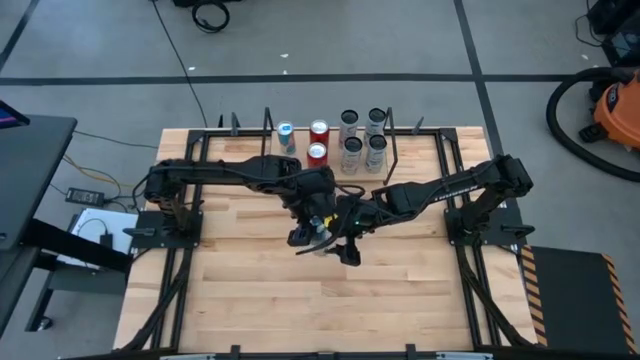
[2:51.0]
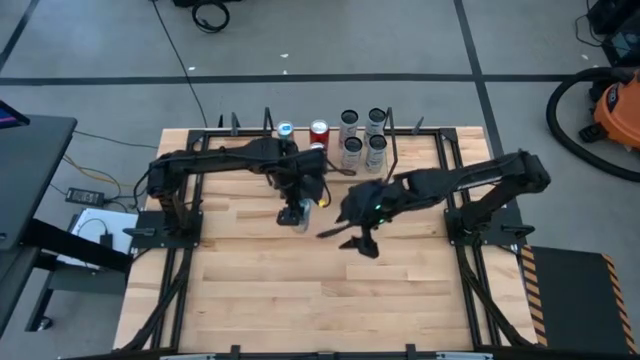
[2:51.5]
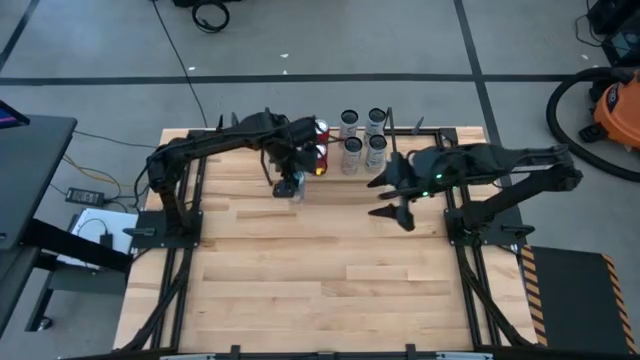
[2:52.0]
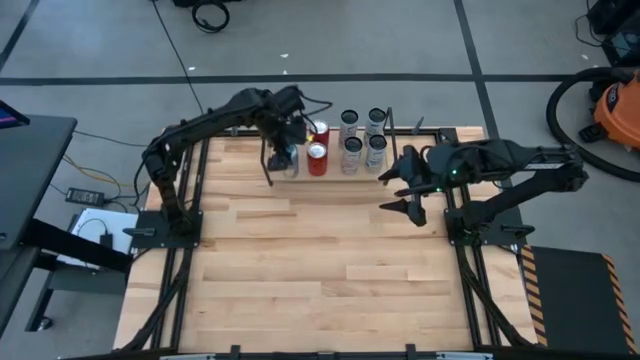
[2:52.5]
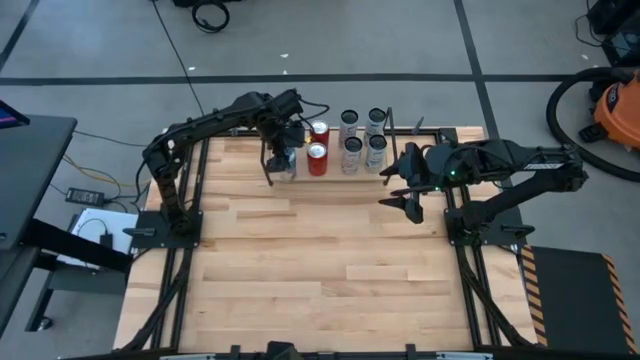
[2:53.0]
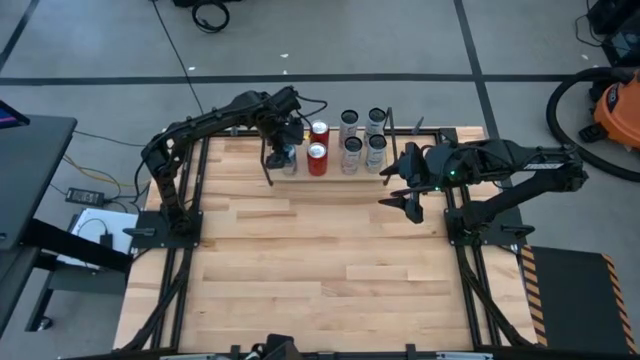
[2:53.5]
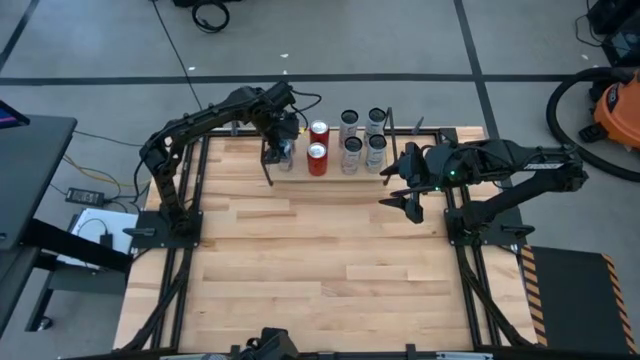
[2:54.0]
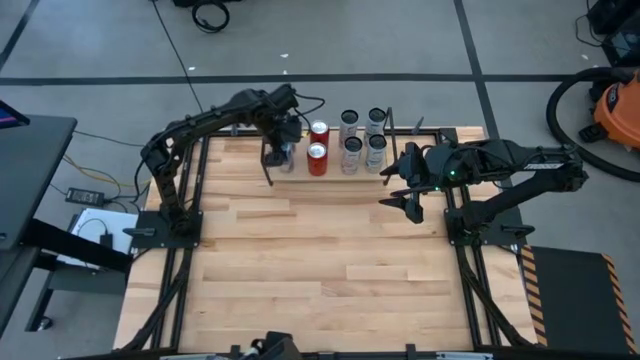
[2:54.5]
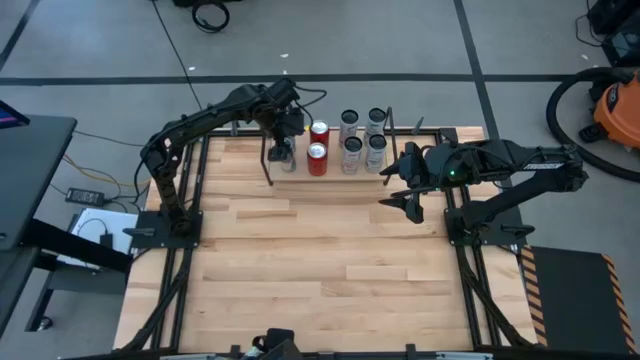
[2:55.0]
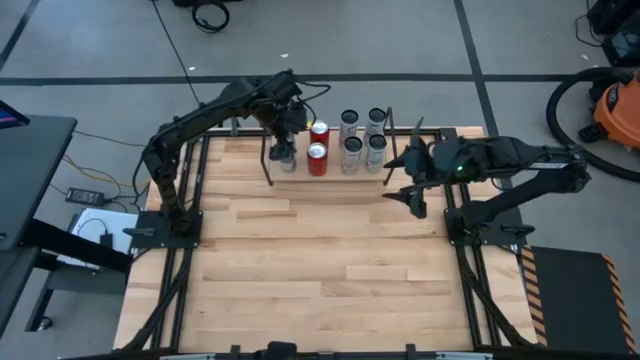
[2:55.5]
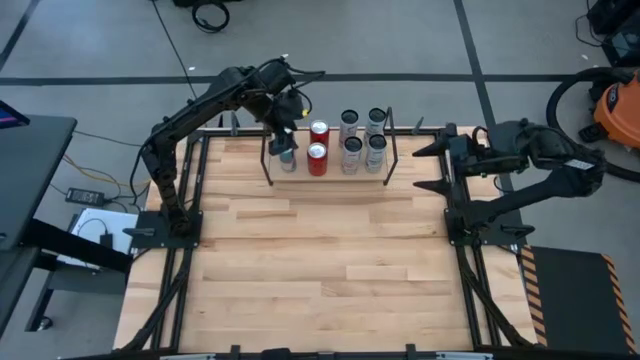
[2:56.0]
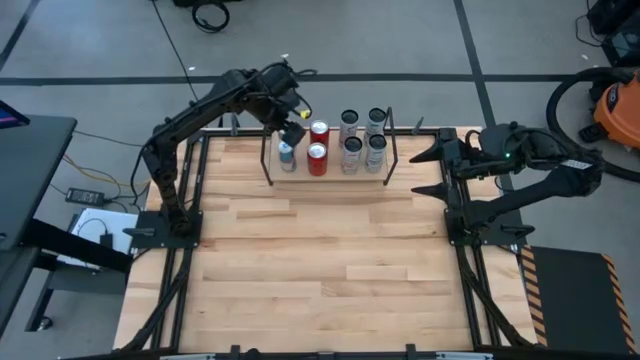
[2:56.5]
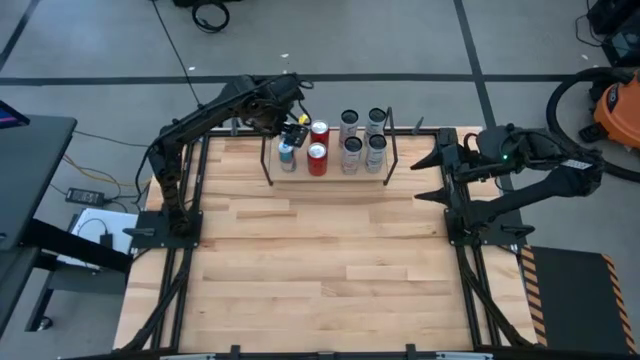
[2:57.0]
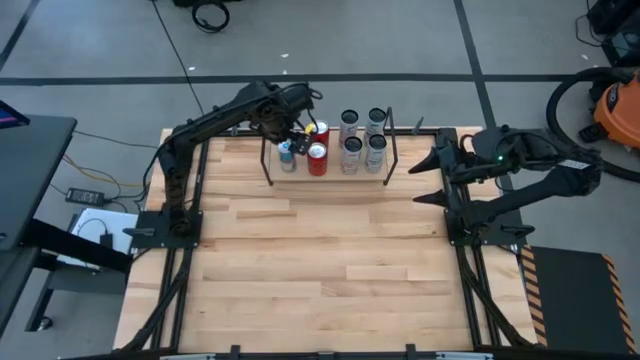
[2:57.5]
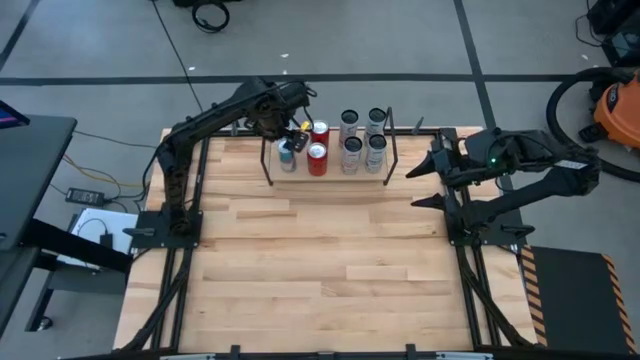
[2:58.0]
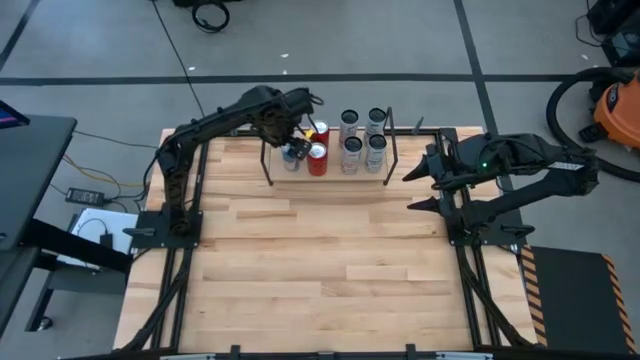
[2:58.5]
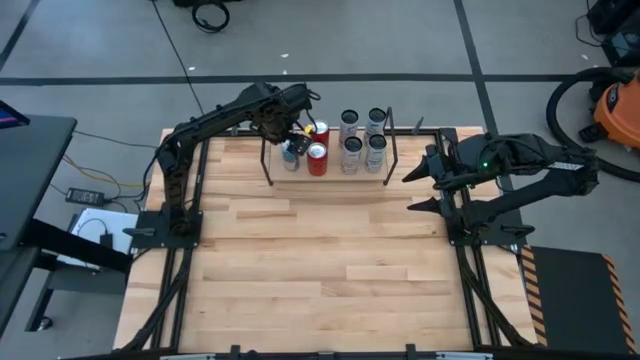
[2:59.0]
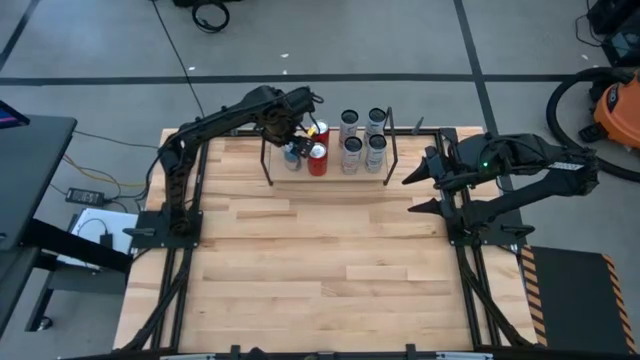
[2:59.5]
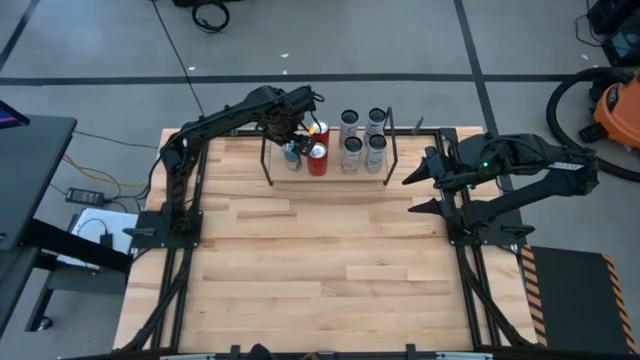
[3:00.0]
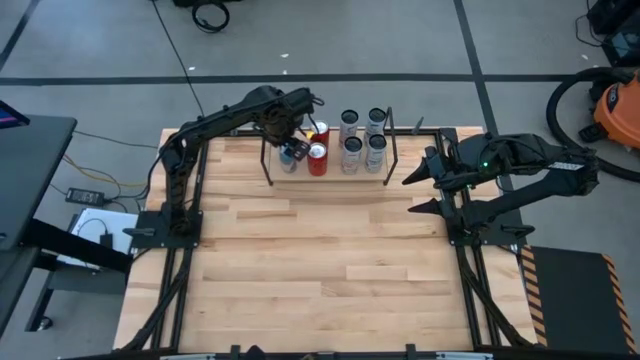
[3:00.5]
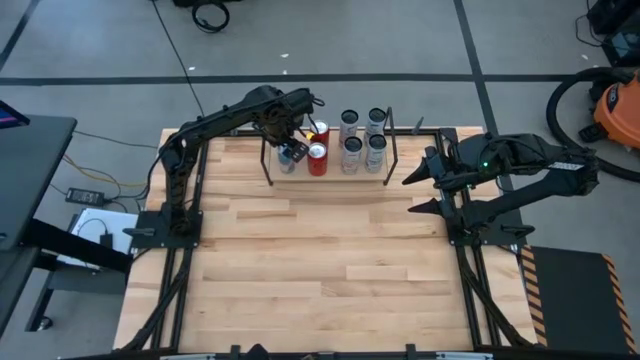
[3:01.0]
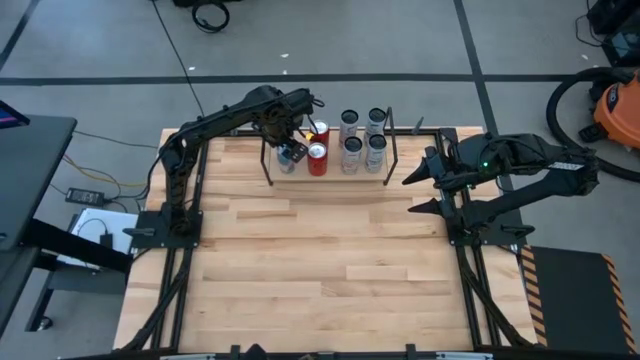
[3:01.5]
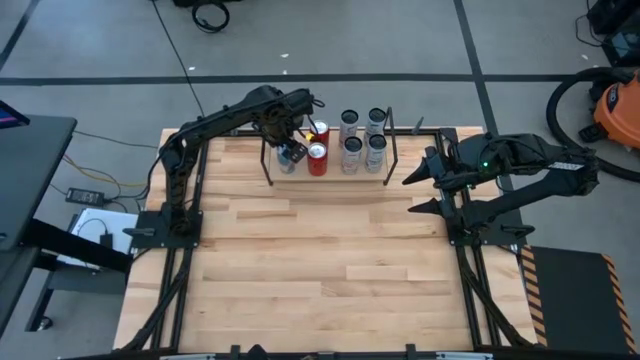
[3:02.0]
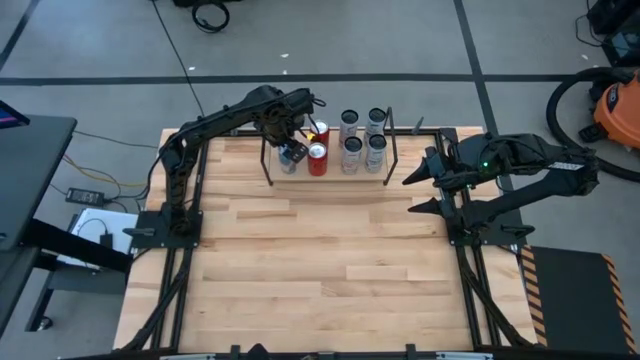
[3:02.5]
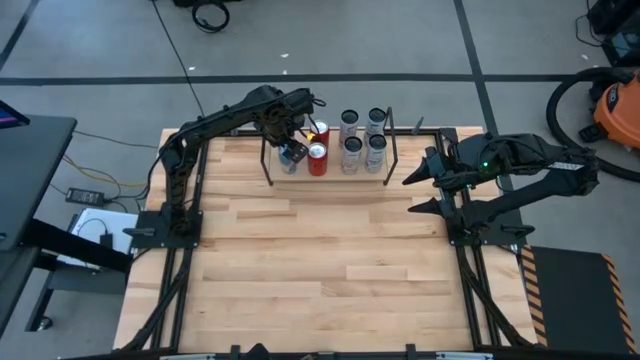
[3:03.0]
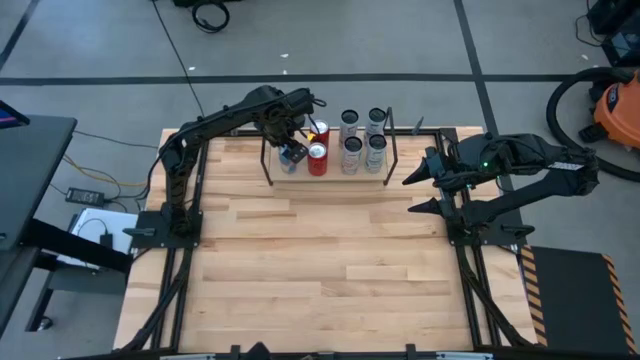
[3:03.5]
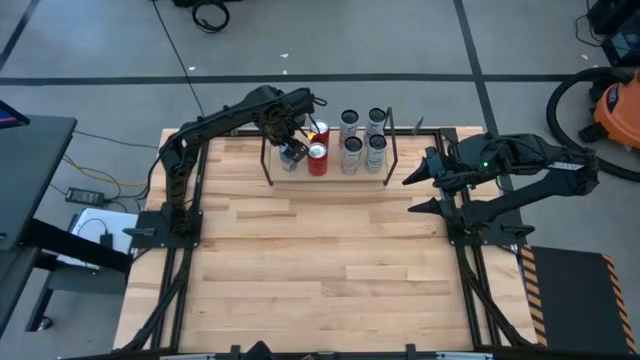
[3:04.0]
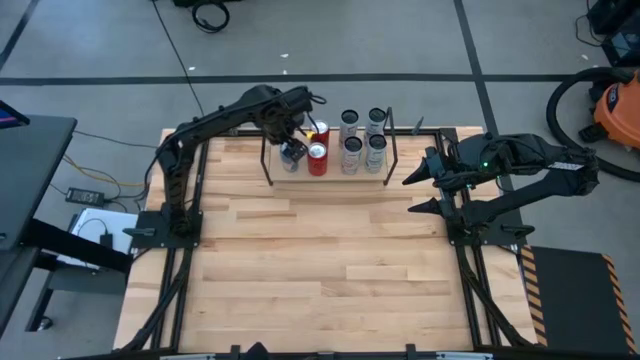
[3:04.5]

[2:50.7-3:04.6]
Task: Place canned beverage on shelf
Put the blue soda can on the shelf aligned with the other blue soda can

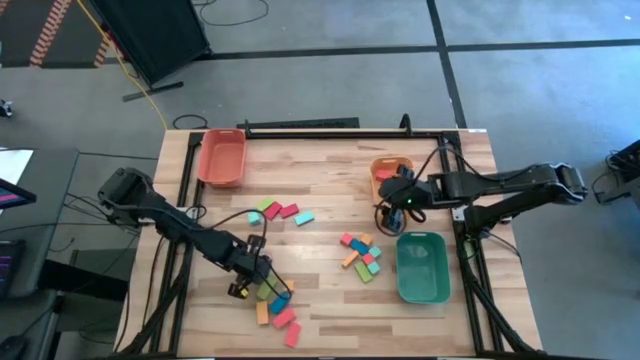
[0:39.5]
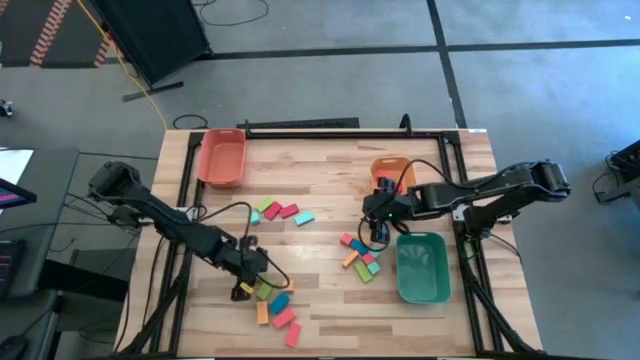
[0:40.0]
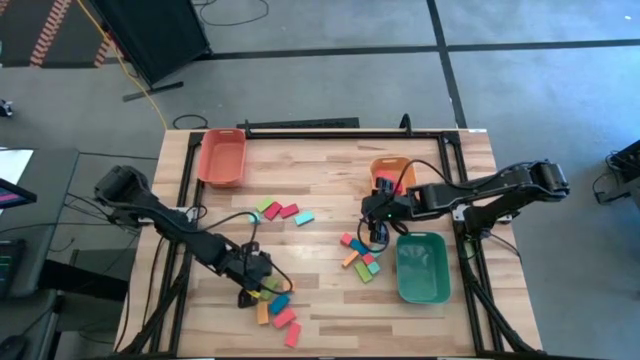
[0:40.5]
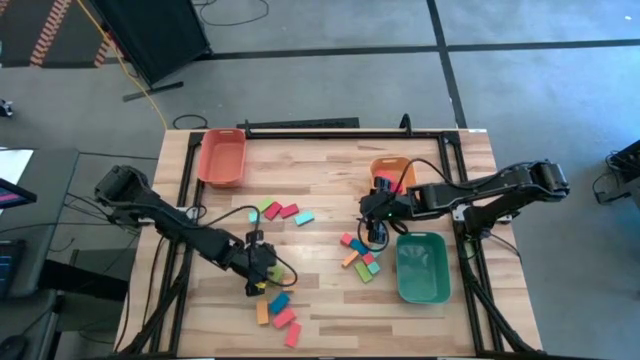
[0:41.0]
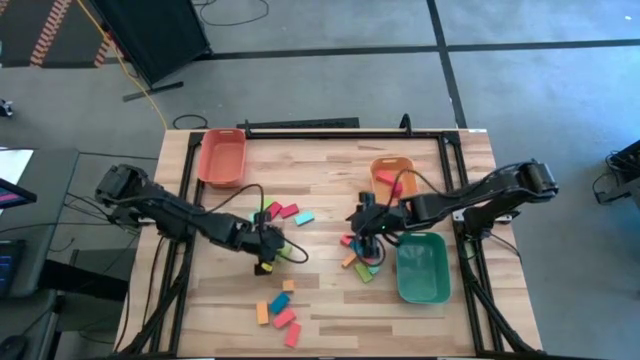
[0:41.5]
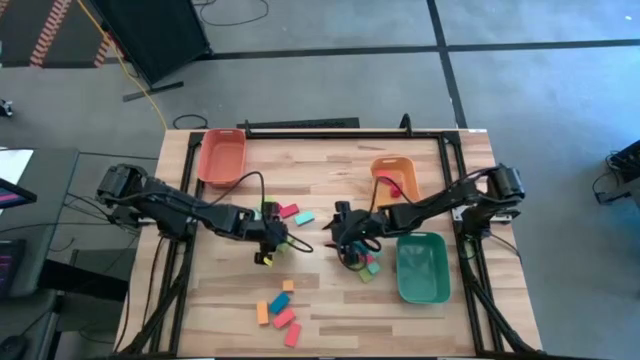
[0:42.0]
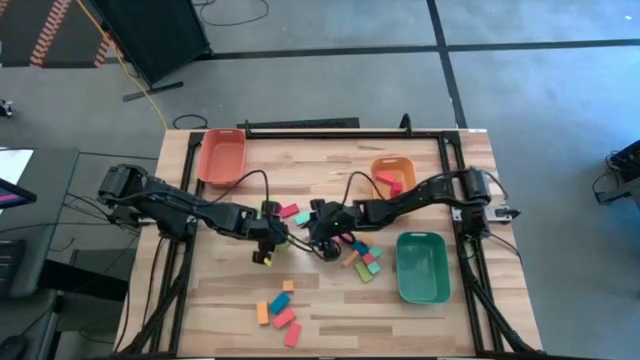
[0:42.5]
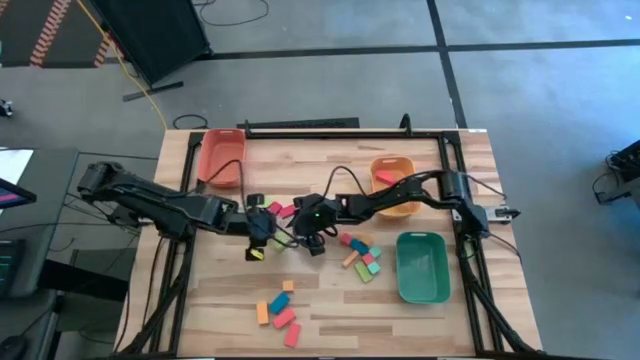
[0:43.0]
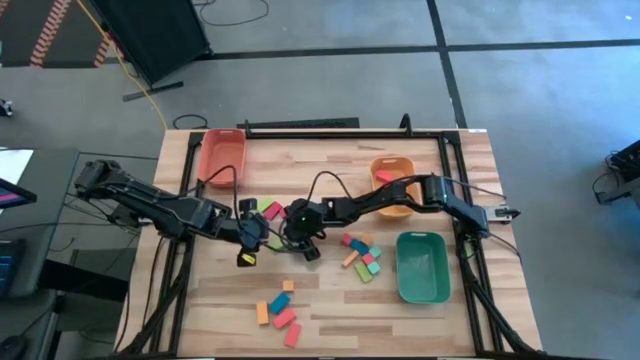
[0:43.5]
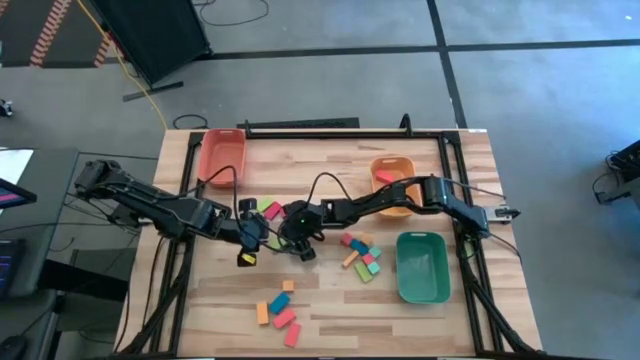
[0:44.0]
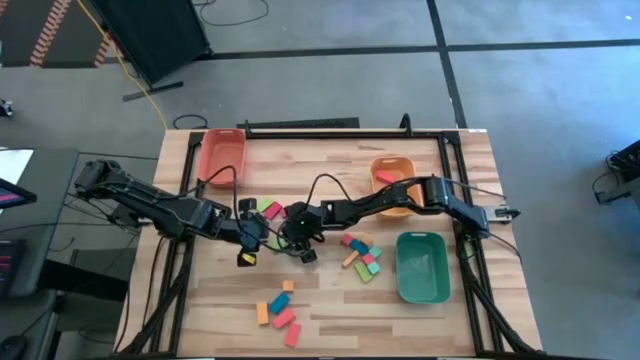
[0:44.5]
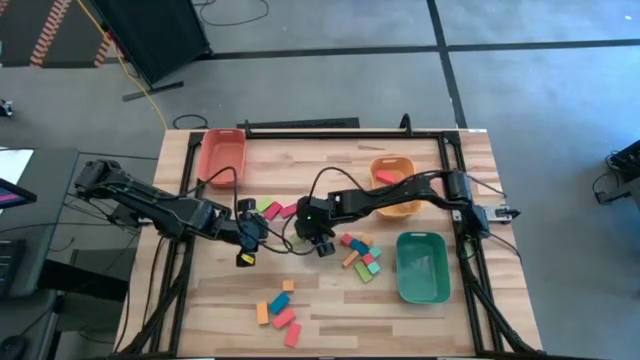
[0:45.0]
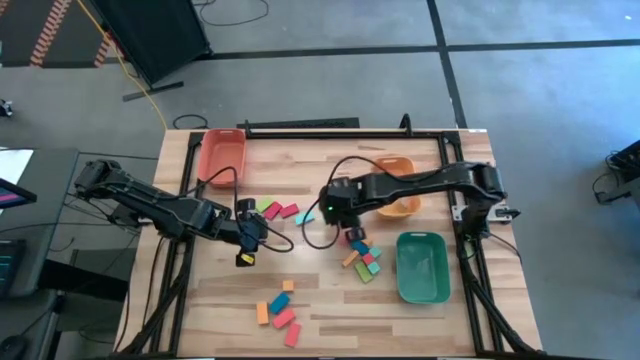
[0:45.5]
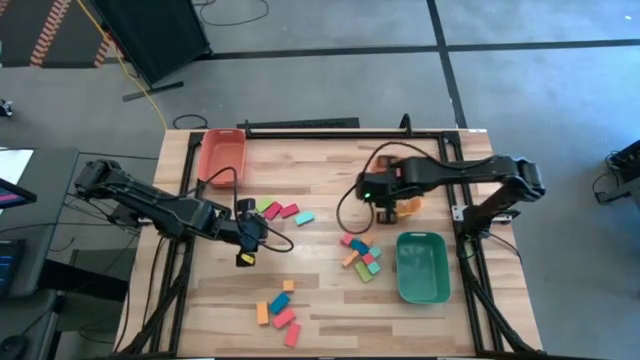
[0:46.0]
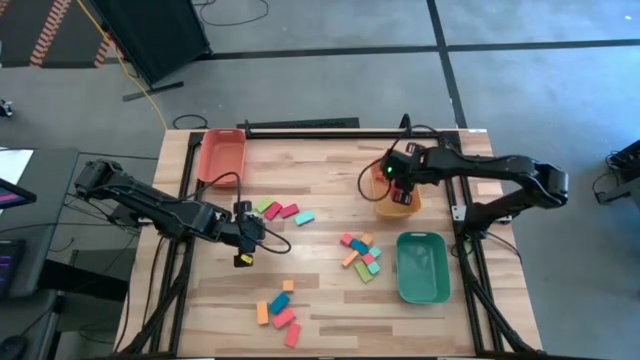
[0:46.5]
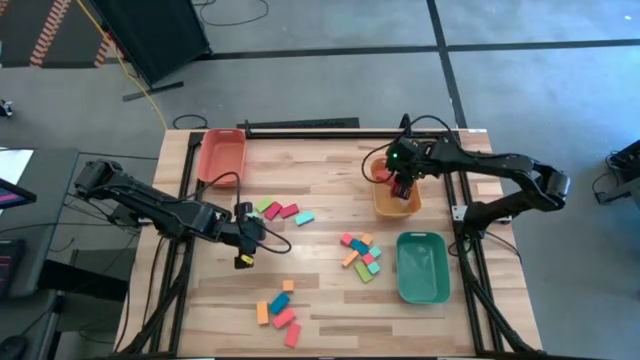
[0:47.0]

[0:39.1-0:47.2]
Task: Sort blocks by size
Put the large rectangular green block into the yellow bin
